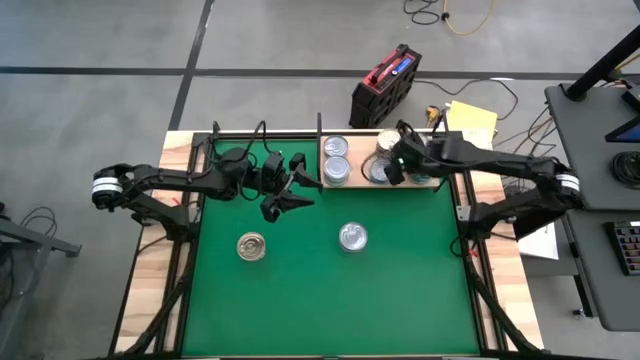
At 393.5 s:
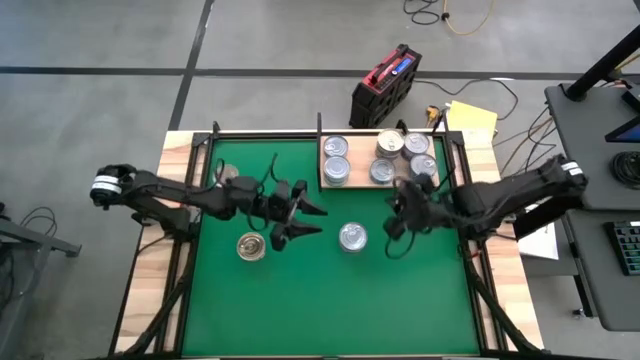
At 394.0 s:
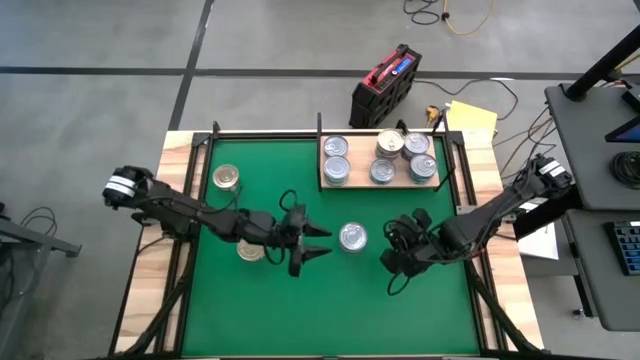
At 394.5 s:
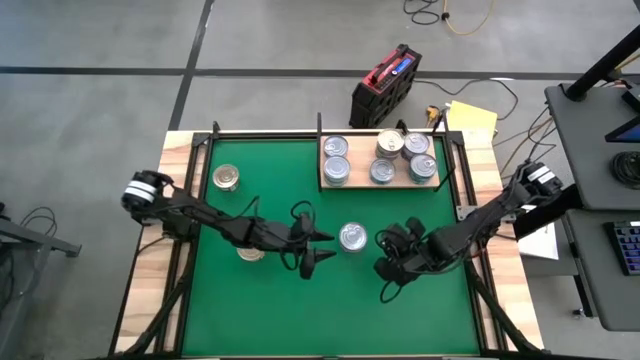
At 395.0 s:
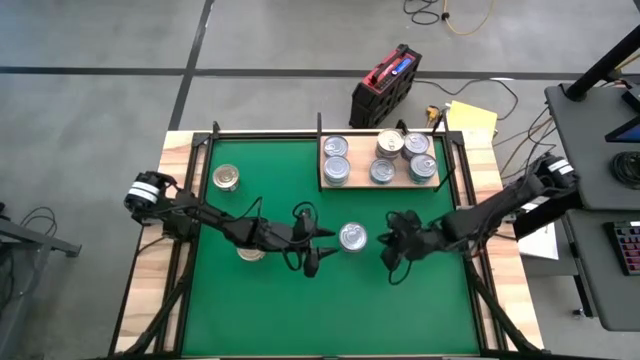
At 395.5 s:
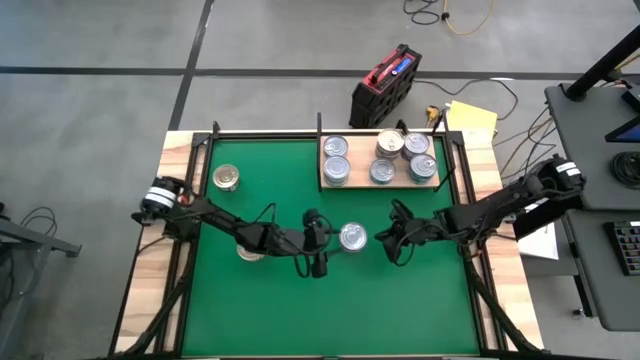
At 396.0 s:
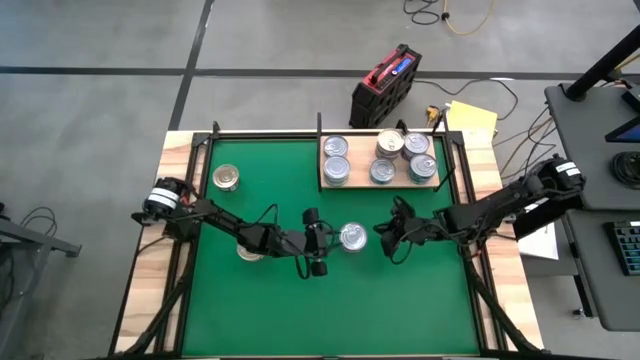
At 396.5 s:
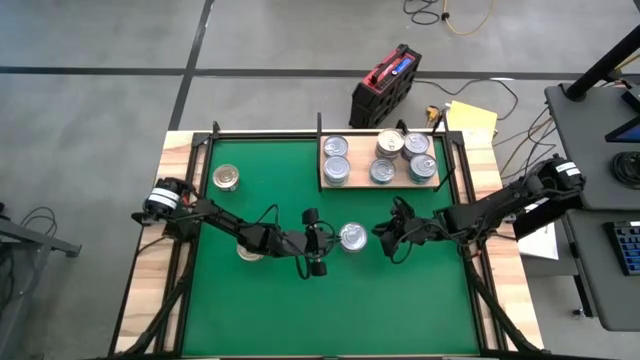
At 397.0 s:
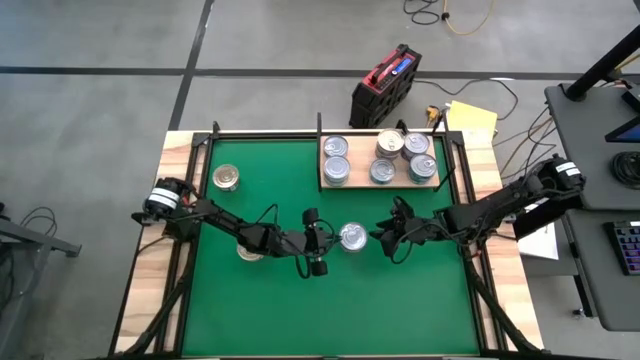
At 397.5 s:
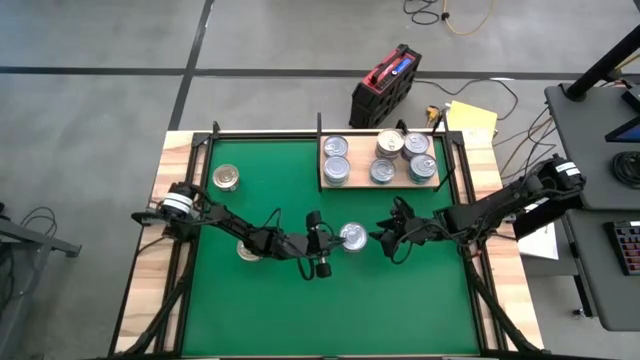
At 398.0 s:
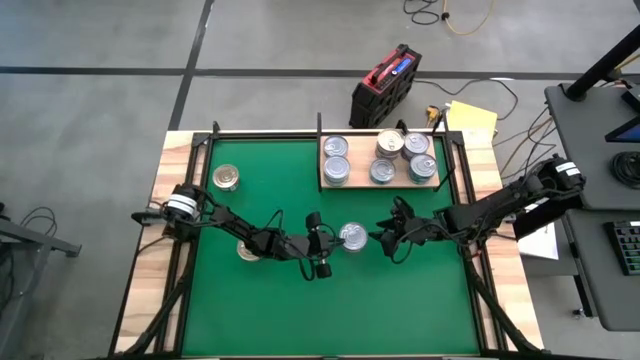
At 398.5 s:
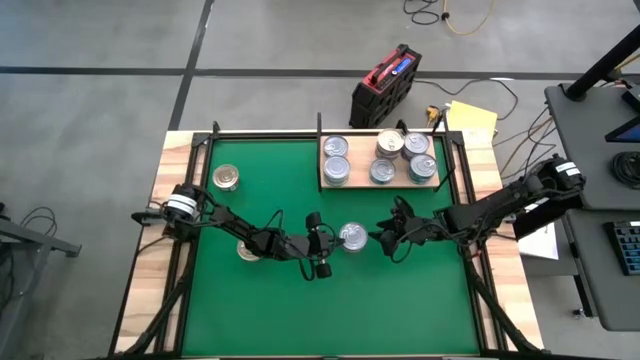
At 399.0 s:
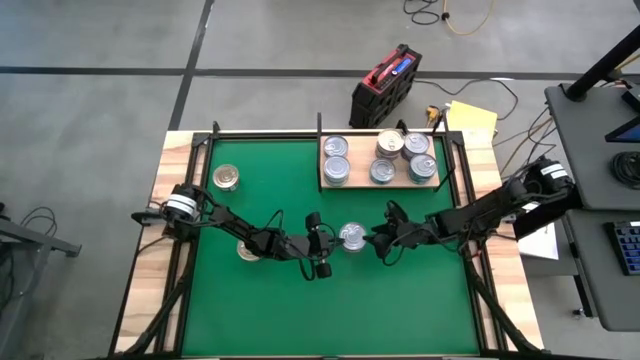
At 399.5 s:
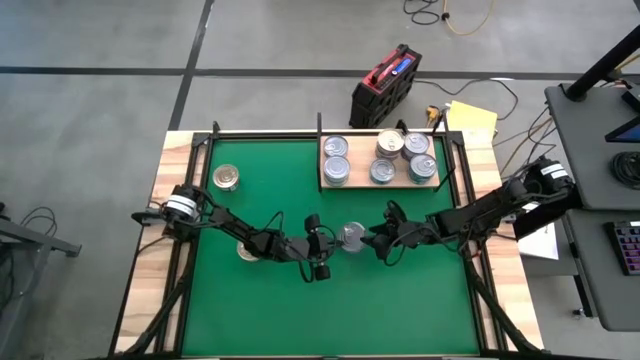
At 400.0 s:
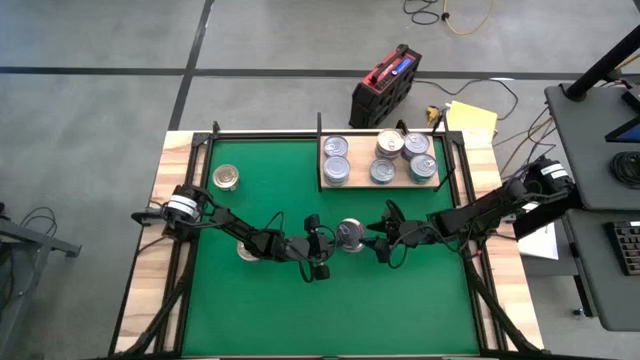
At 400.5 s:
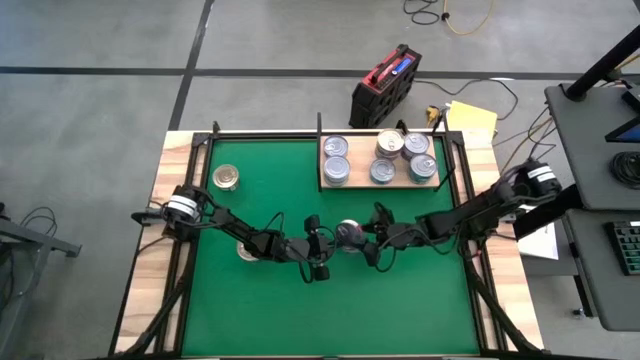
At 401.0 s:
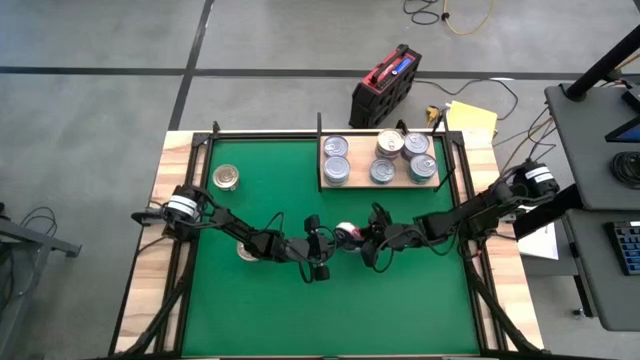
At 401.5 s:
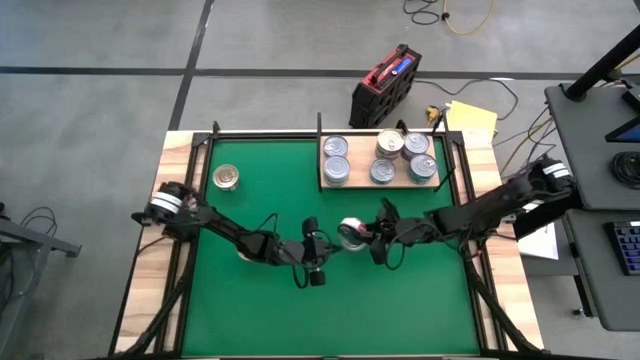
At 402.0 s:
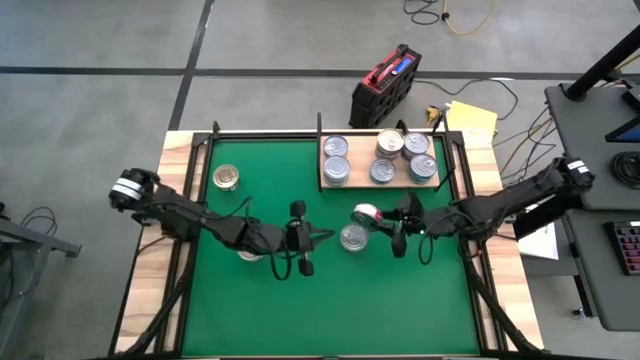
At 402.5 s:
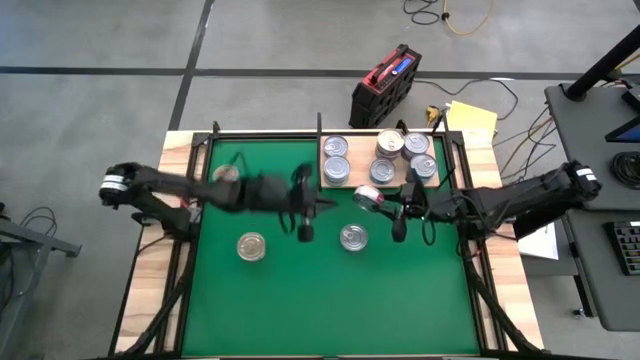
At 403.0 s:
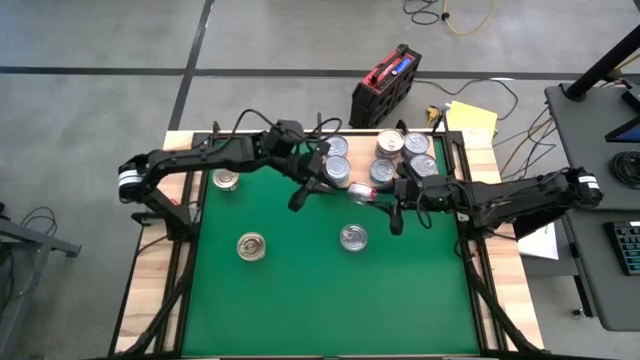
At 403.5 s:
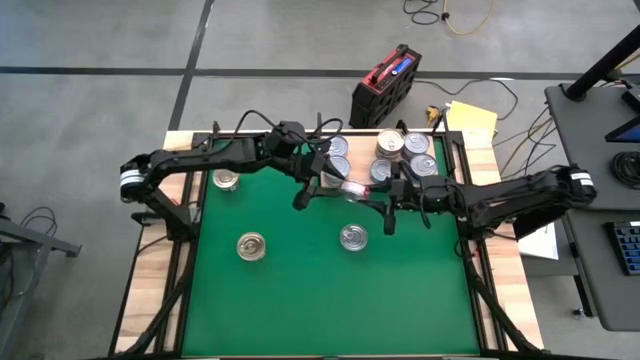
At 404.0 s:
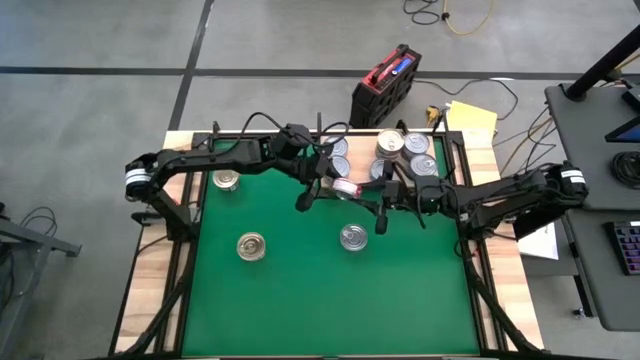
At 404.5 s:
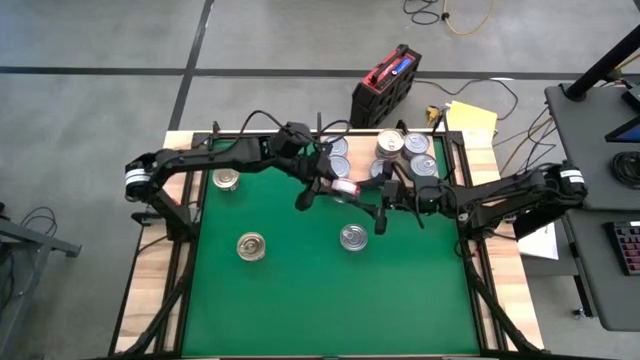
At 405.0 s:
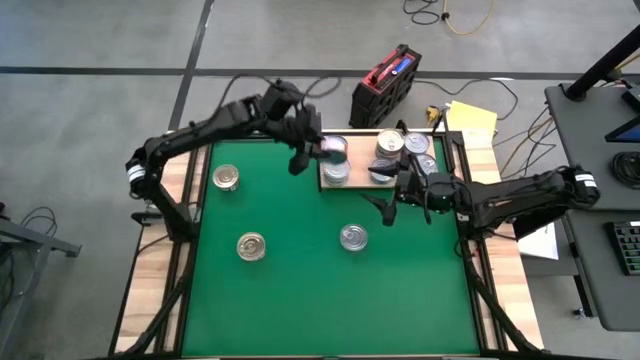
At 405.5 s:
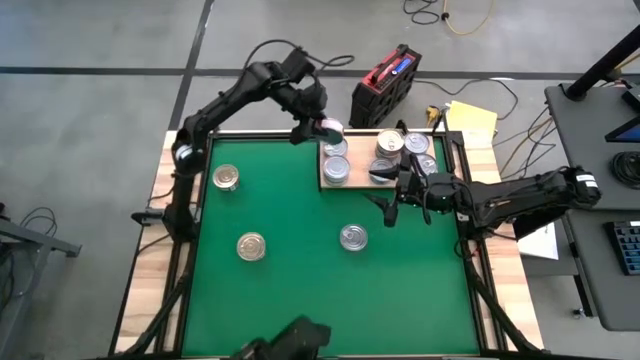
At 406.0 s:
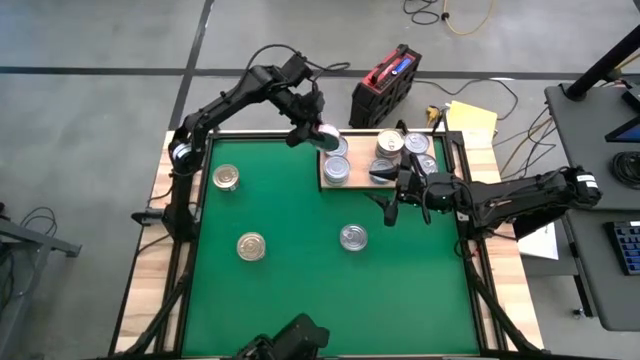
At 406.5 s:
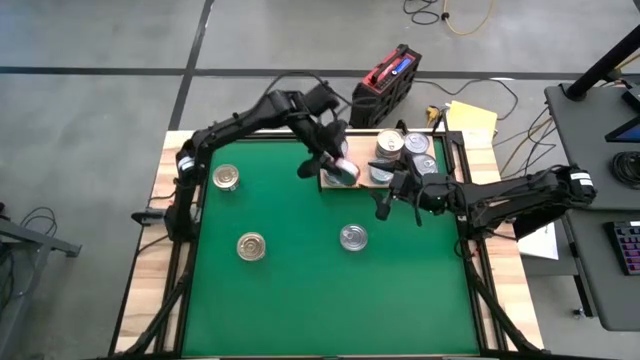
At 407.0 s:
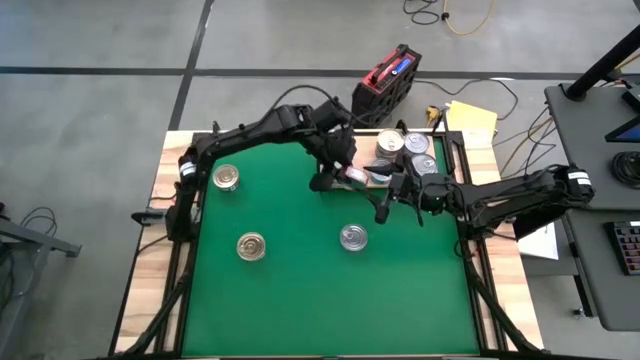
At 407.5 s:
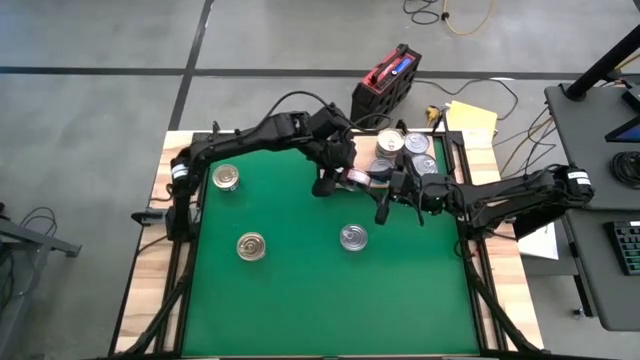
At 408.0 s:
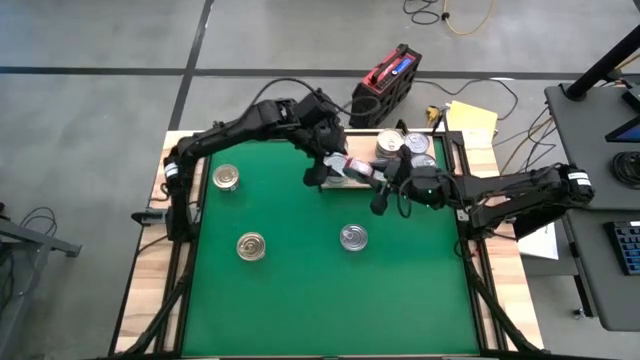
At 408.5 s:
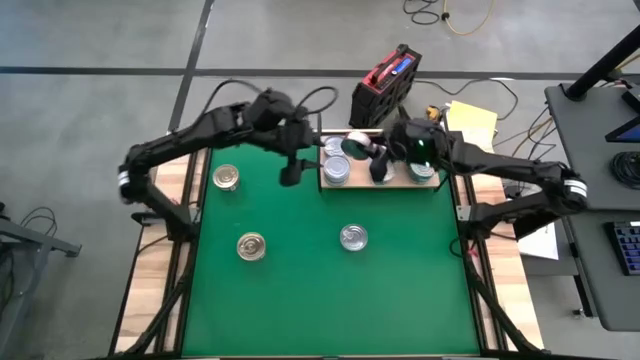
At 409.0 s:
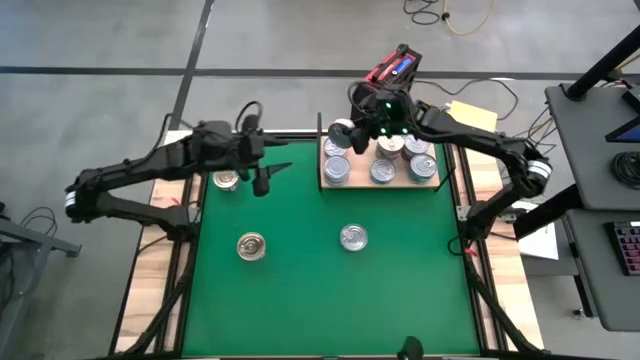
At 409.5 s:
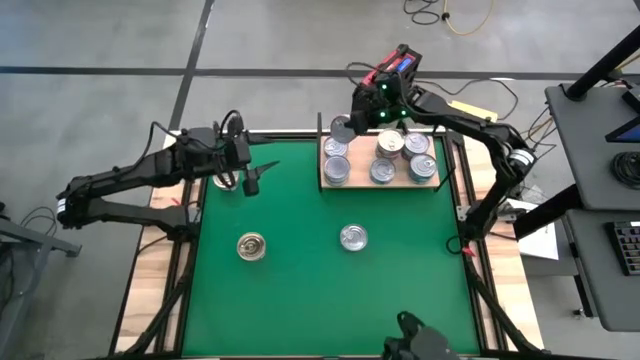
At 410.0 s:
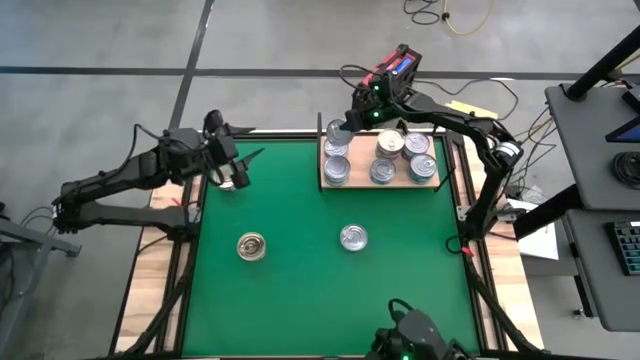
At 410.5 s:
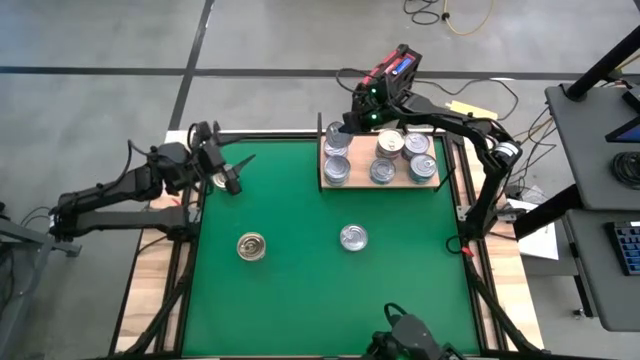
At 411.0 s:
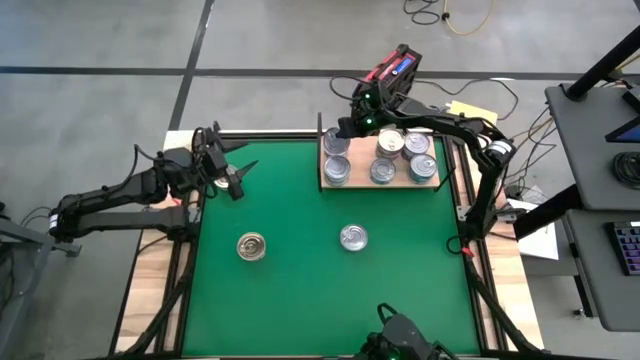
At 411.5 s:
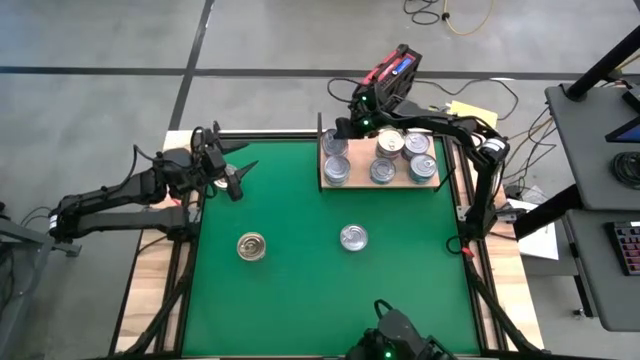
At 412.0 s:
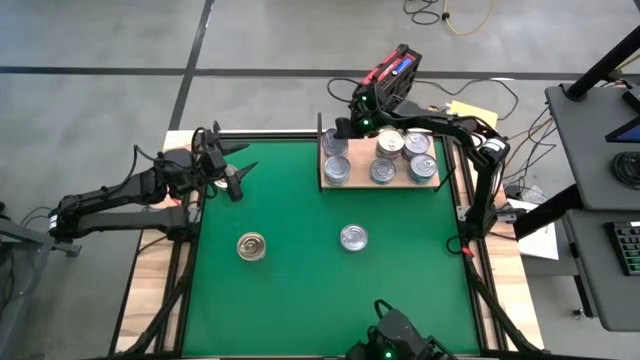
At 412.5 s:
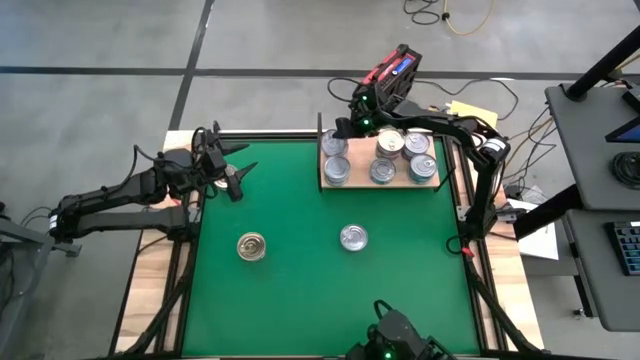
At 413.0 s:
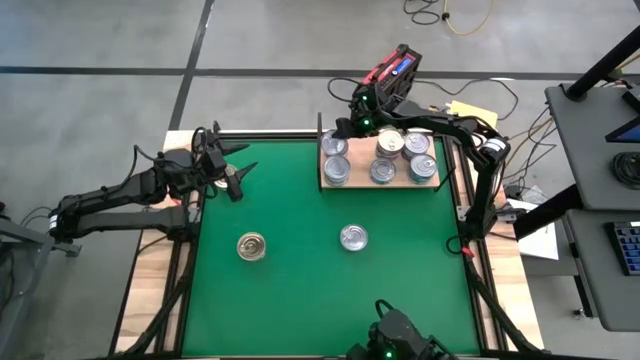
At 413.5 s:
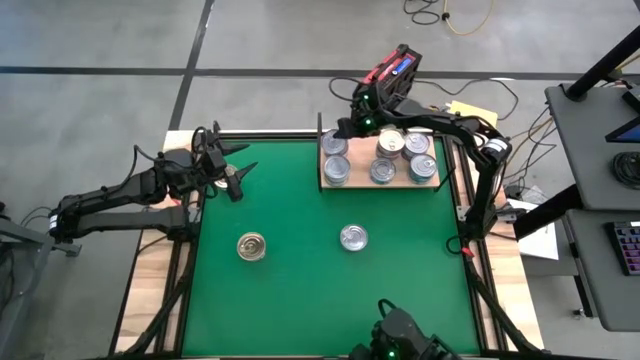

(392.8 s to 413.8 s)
Task: Stack canned seafood by type on shelf
Stack the red tuna can on top of the red tuna can on the shelf

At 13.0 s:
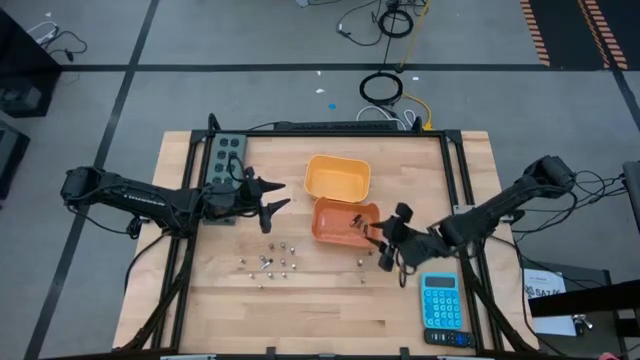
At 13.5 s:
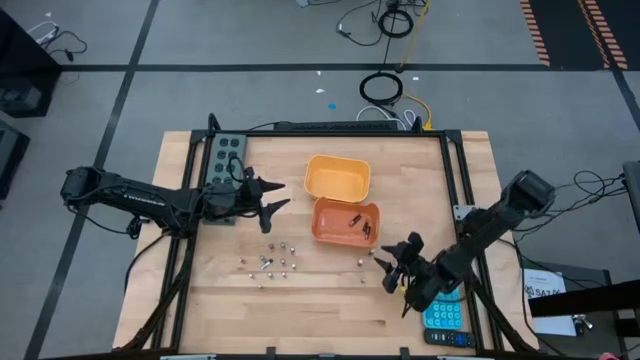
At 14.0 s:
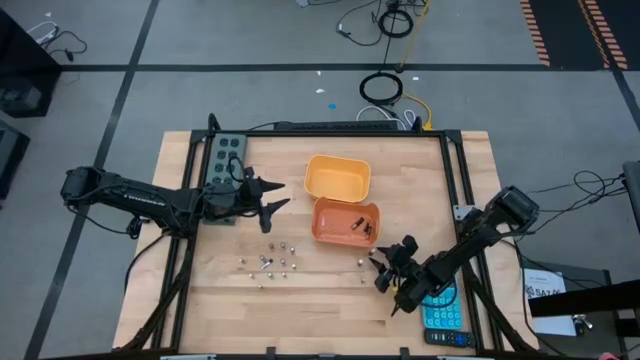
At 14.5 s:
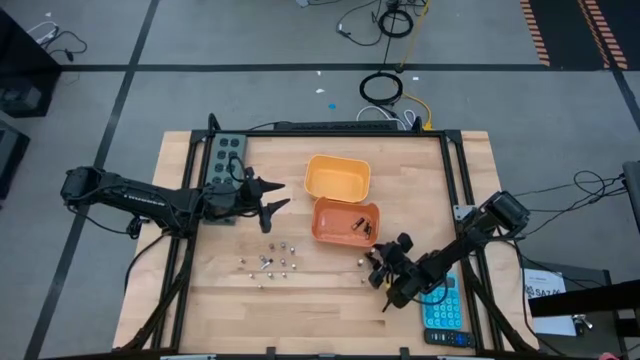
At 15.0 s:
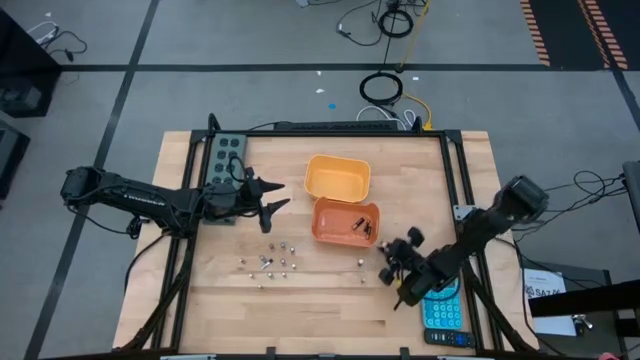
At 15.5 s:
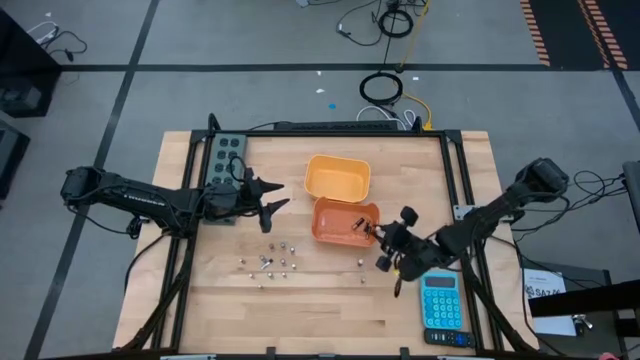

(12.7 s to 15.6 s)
Task: Sort batteries
Put the black battery into the orange bin
